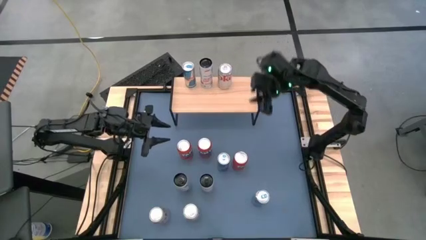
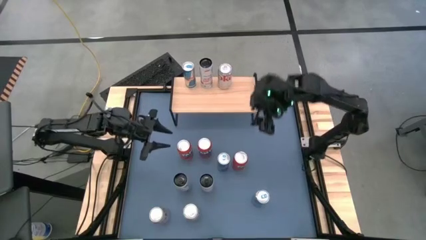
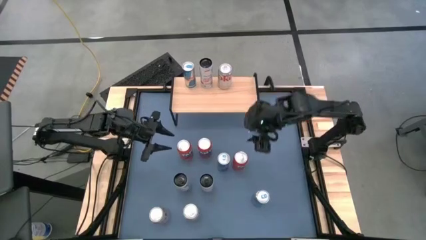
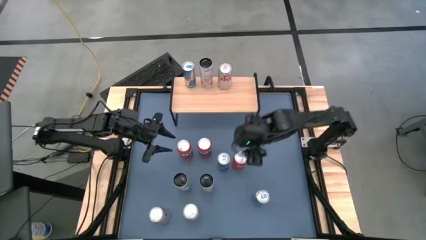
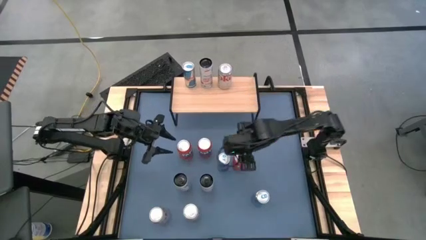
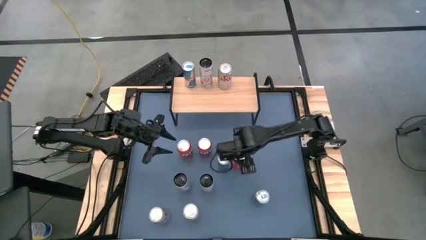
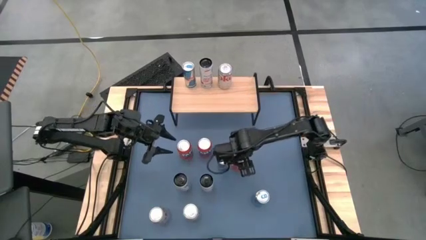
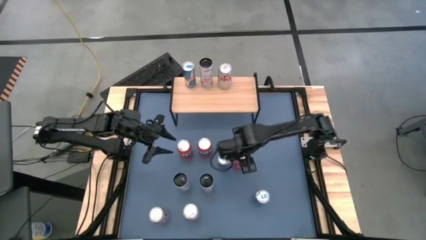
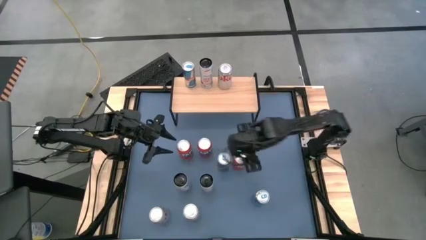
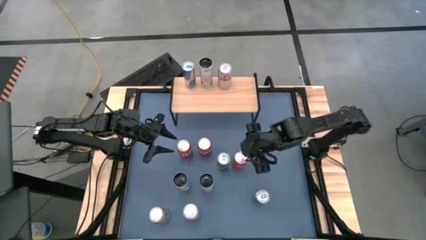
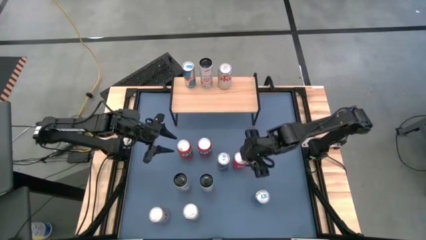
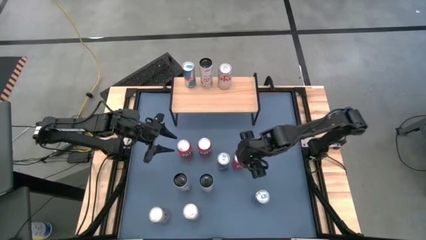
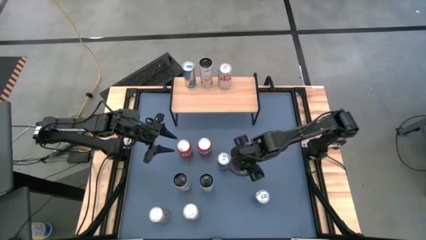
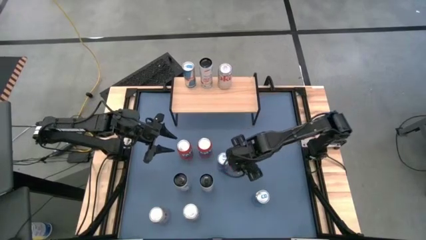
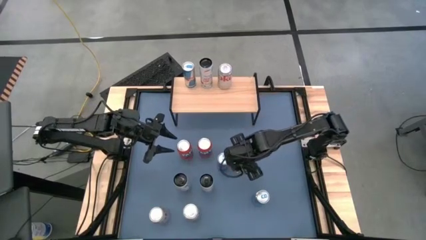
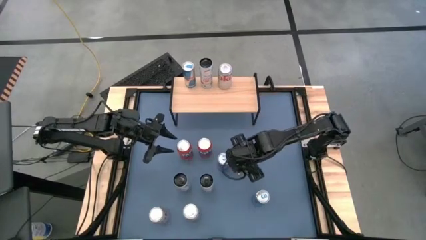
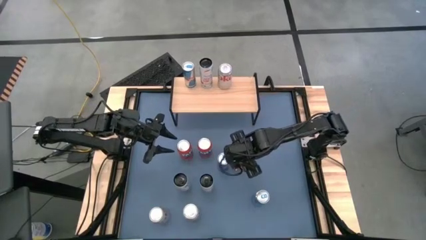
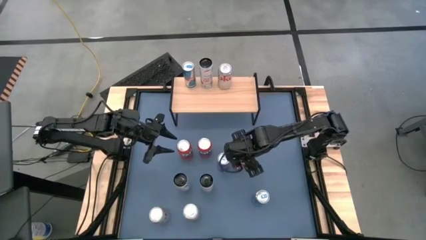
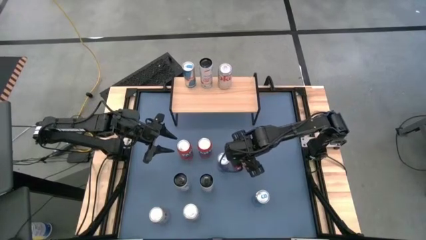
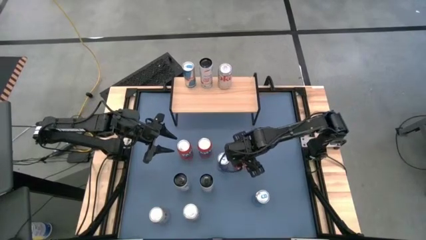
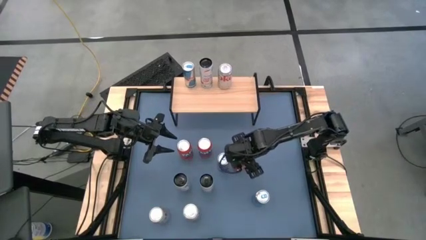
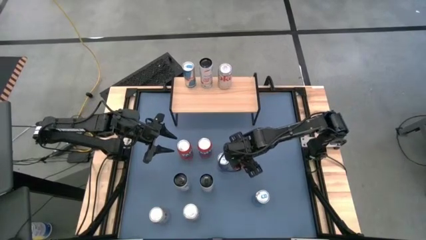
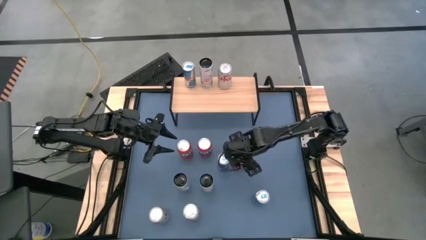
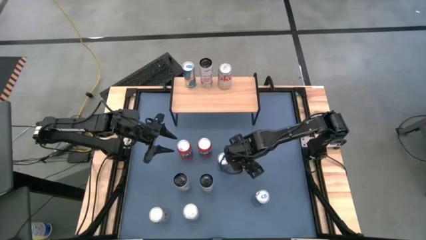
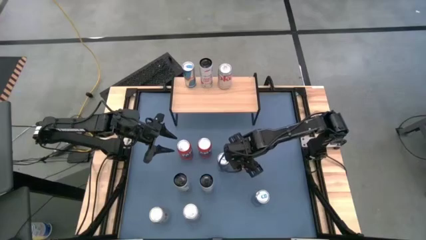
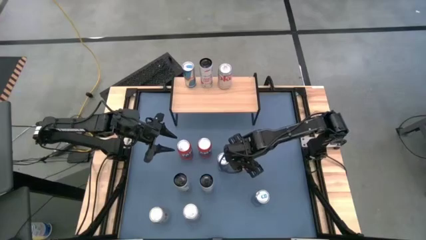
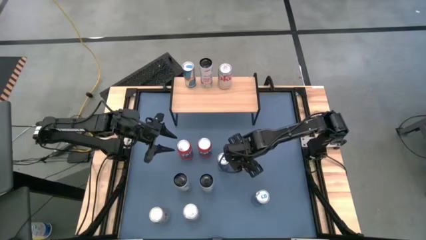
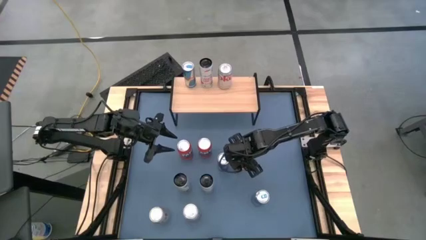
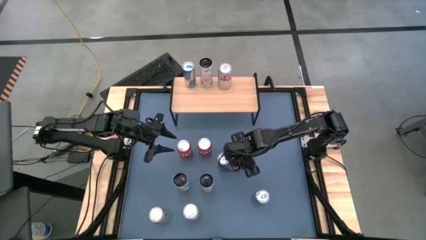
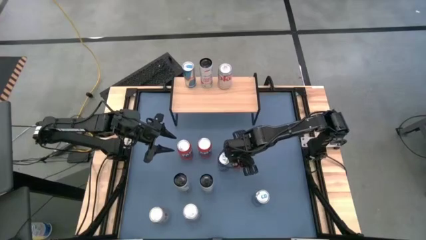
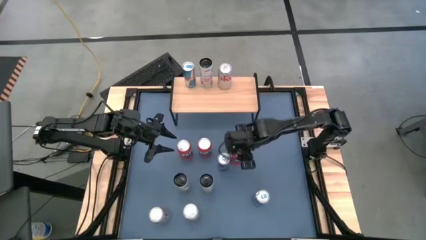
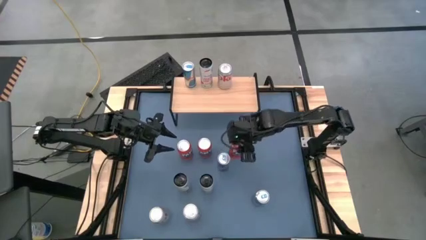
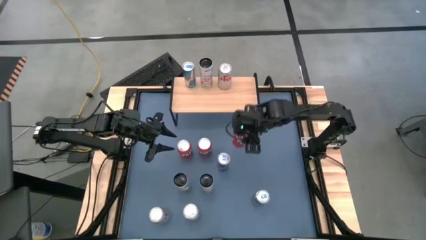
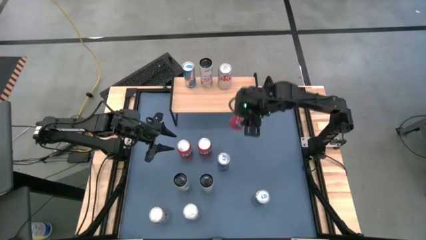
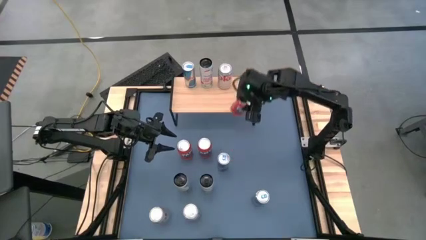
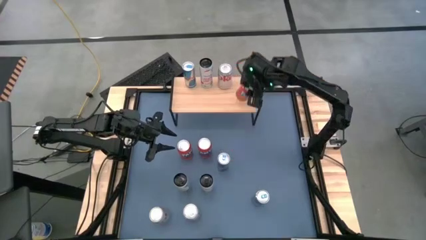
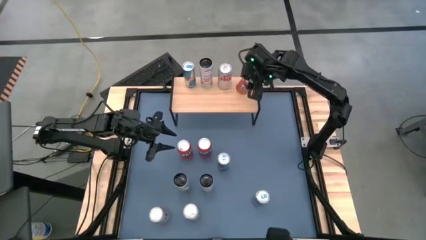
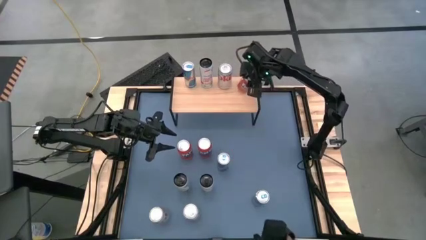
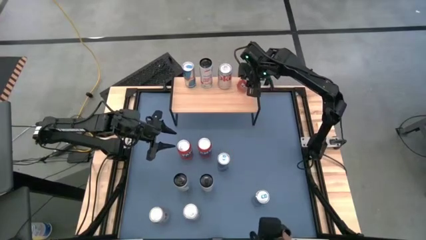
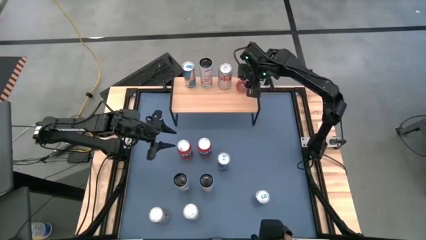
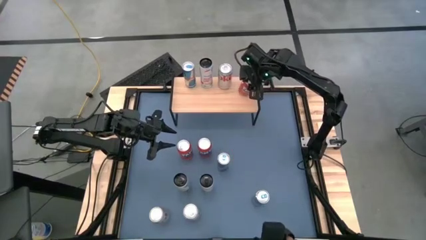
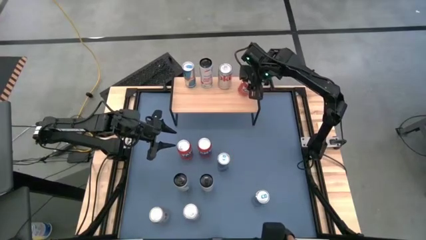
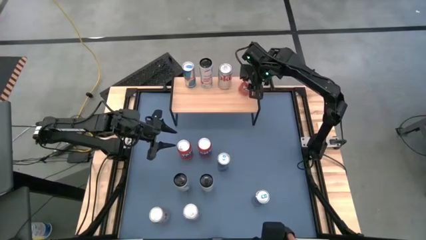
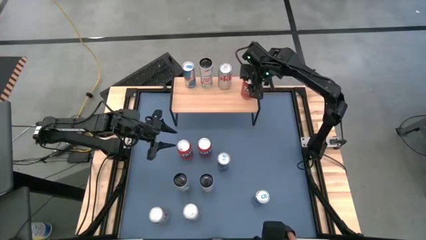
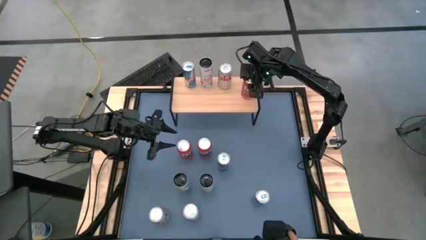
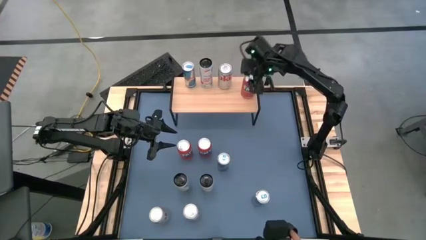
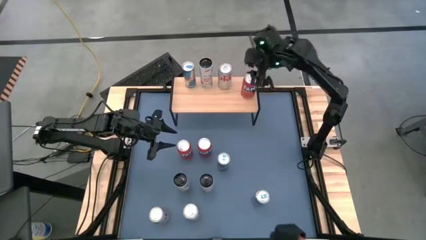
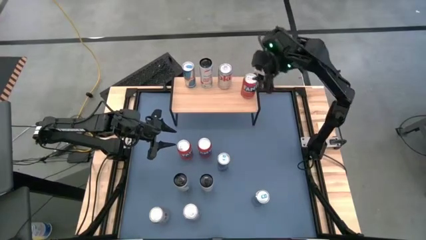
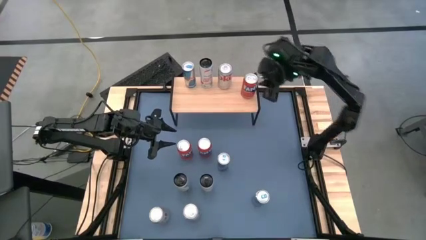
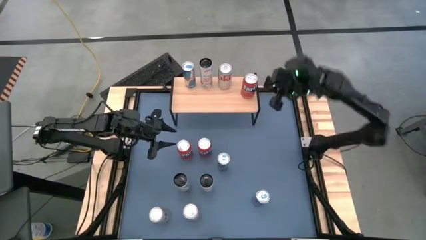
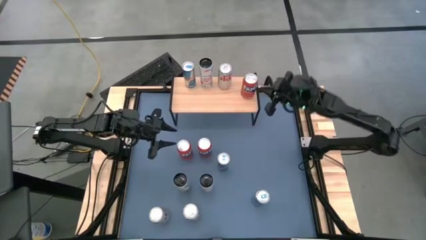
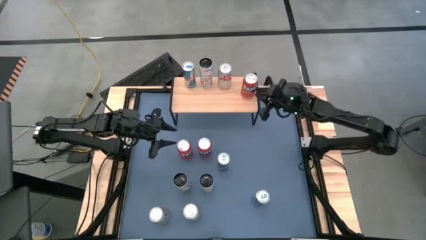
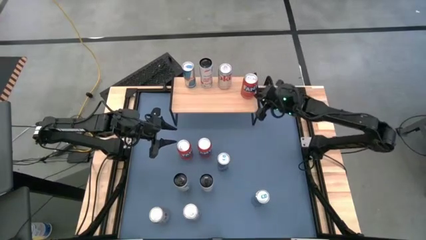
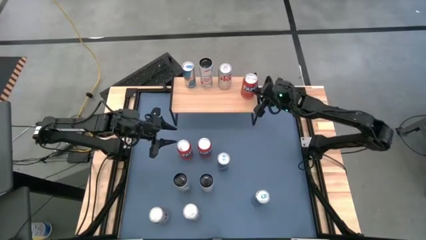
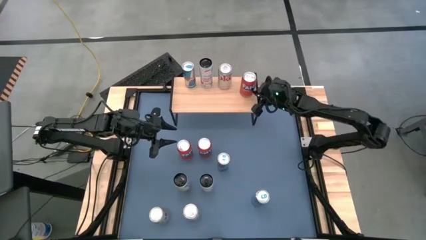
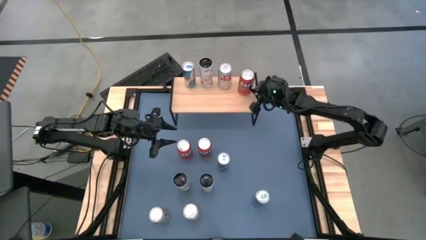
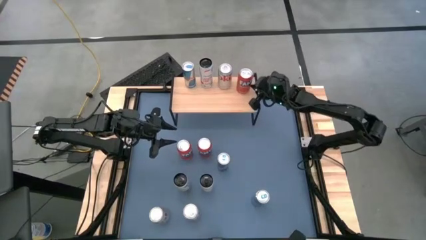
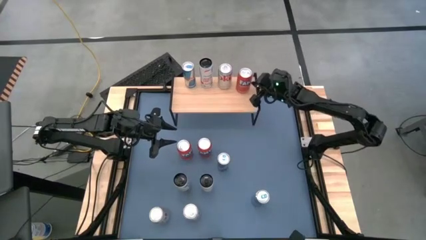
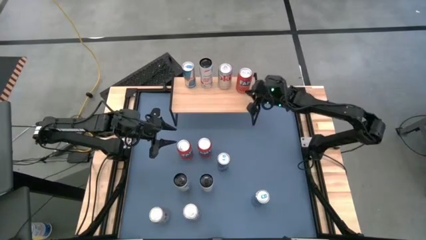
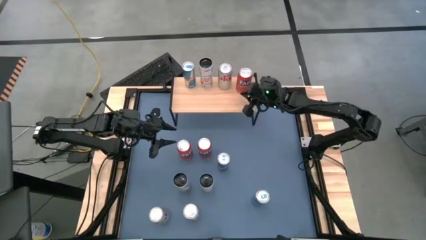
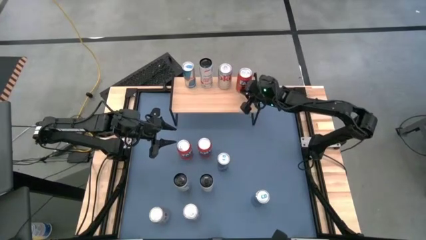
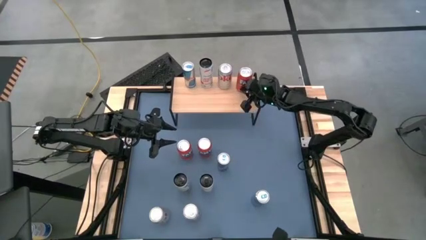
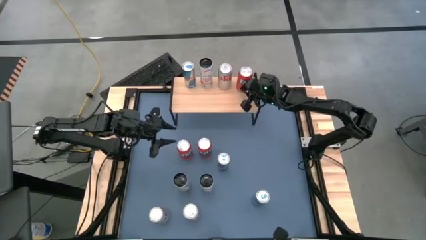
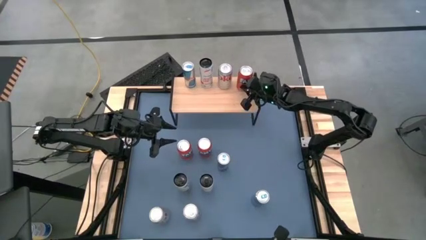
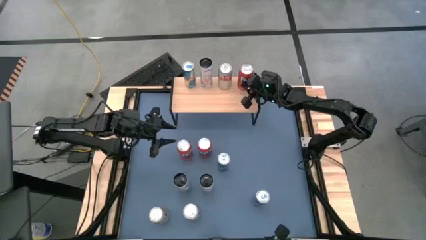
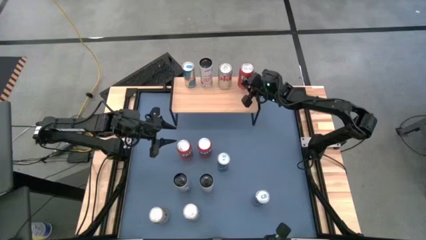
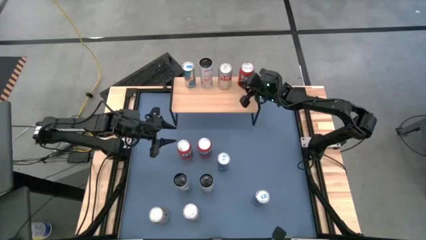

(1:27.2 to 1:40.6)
Task: Place canned beverage on shelf
Put the right orange soda can on the shelf
